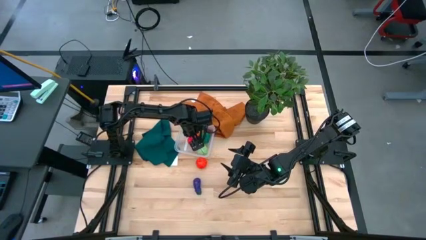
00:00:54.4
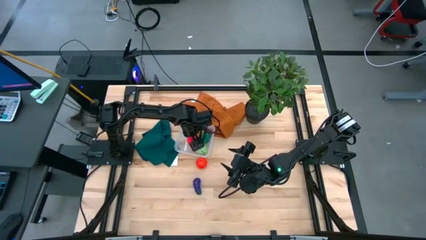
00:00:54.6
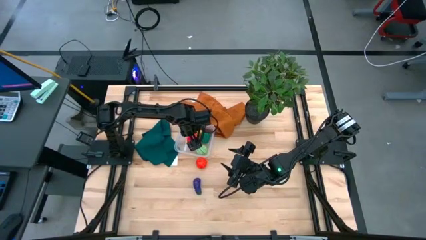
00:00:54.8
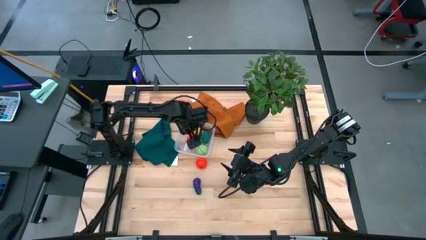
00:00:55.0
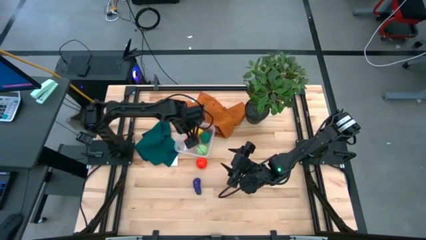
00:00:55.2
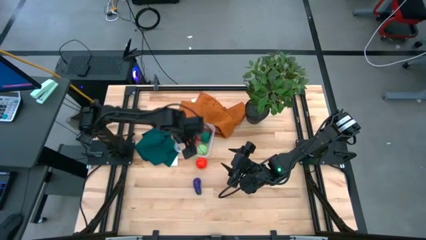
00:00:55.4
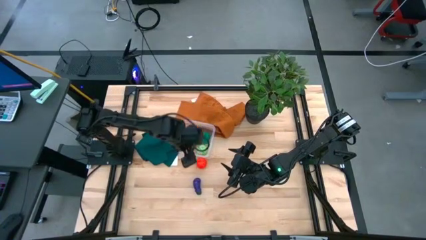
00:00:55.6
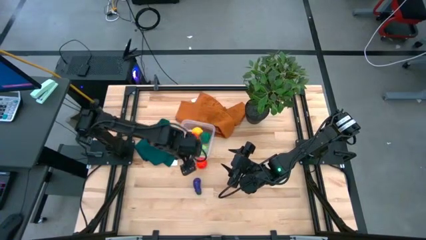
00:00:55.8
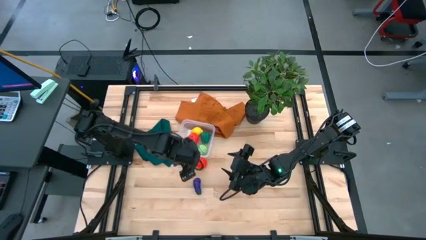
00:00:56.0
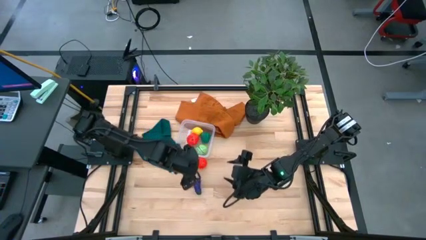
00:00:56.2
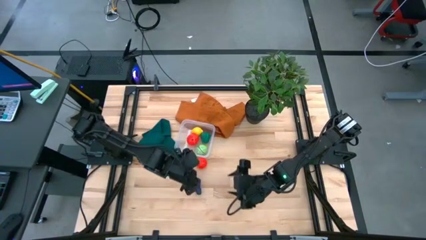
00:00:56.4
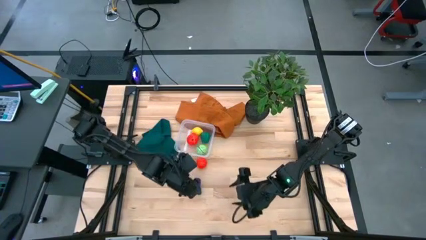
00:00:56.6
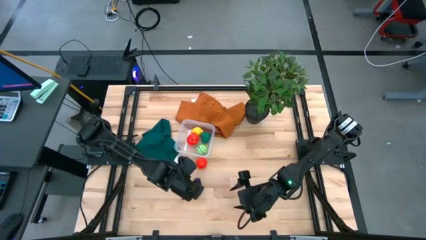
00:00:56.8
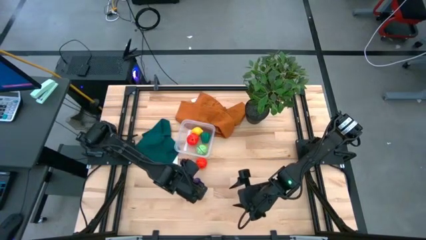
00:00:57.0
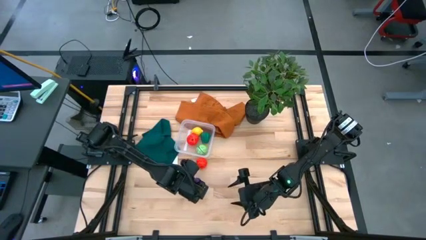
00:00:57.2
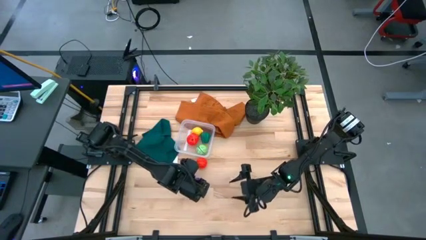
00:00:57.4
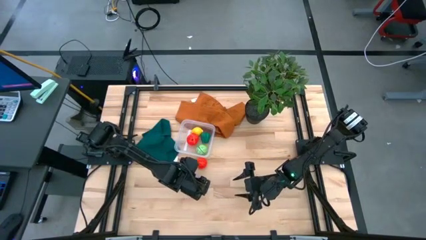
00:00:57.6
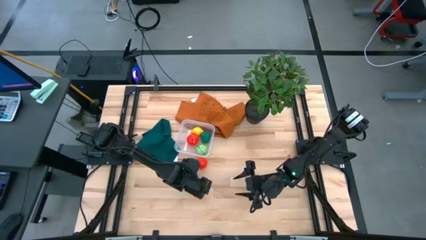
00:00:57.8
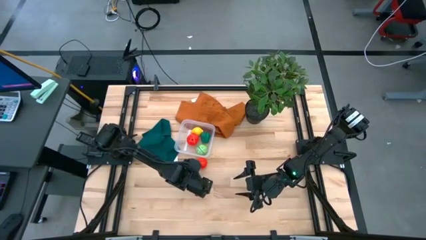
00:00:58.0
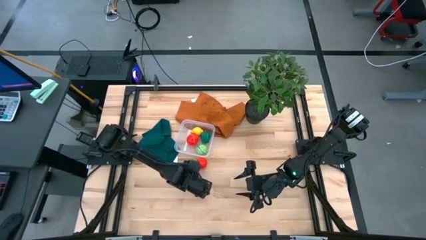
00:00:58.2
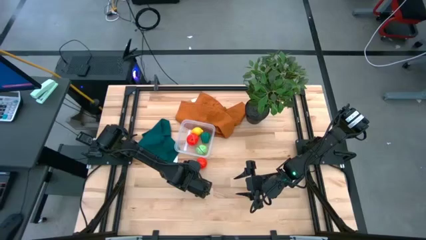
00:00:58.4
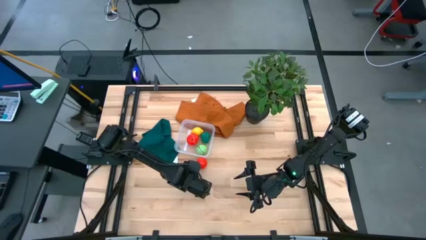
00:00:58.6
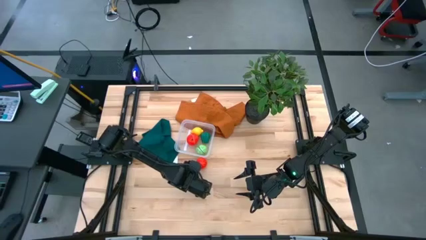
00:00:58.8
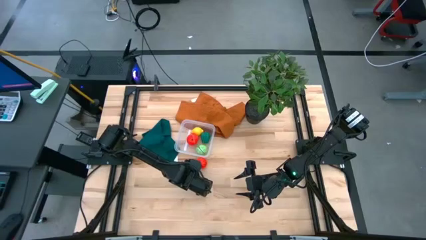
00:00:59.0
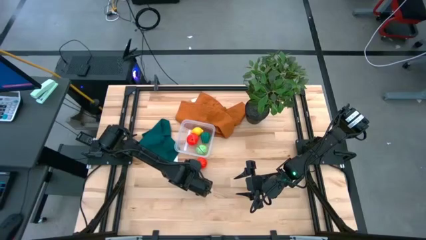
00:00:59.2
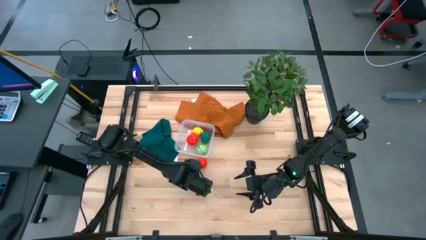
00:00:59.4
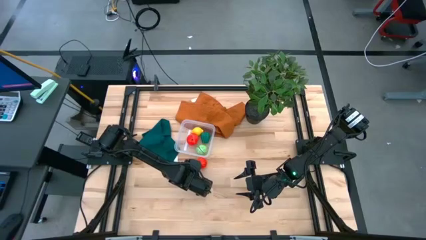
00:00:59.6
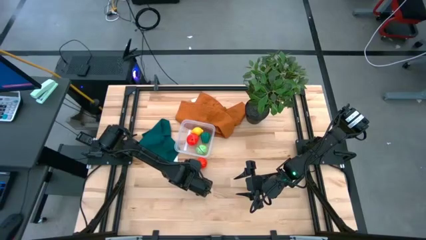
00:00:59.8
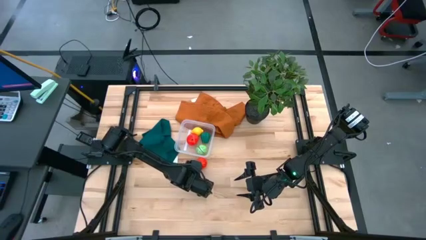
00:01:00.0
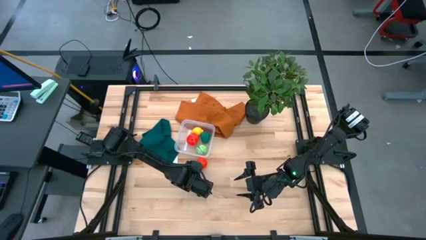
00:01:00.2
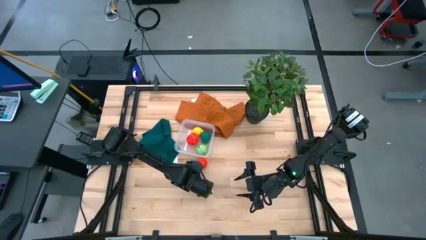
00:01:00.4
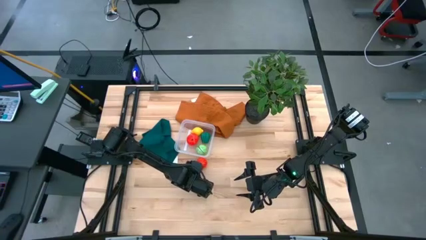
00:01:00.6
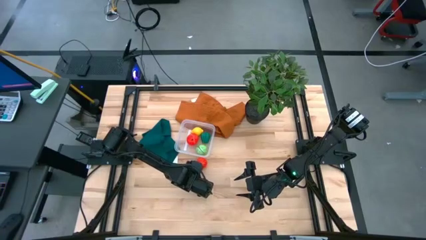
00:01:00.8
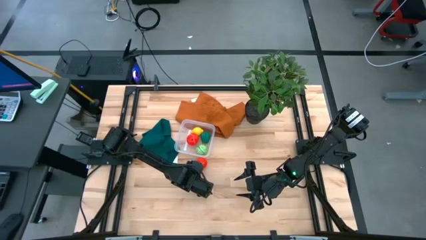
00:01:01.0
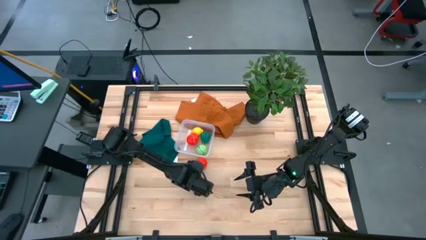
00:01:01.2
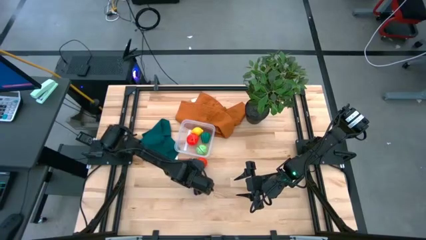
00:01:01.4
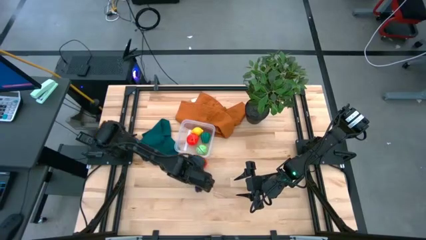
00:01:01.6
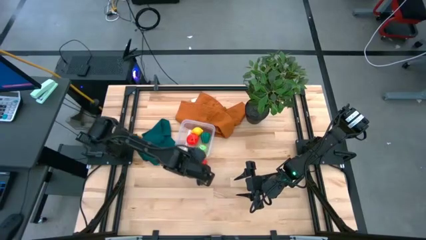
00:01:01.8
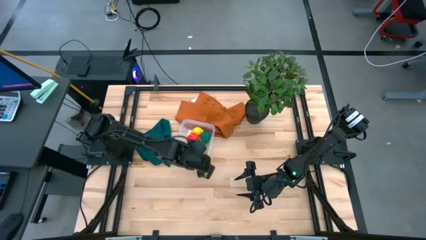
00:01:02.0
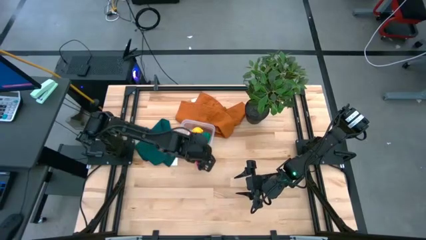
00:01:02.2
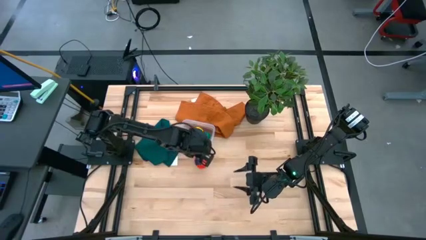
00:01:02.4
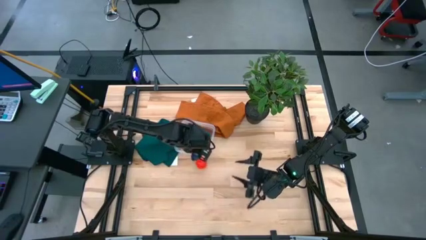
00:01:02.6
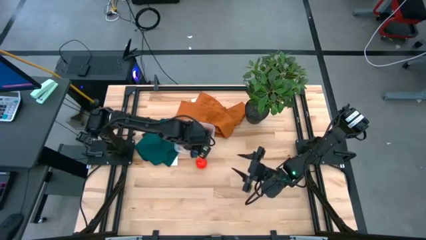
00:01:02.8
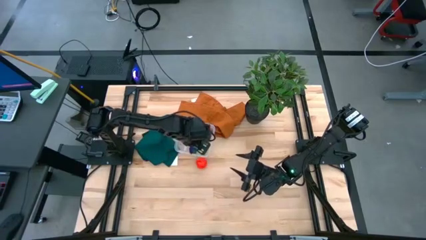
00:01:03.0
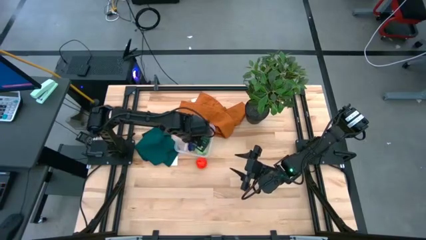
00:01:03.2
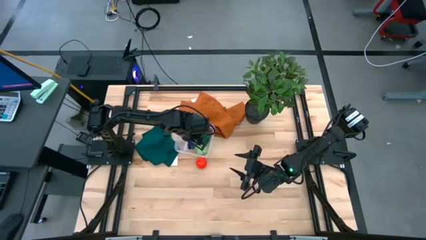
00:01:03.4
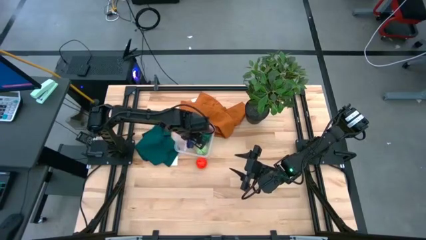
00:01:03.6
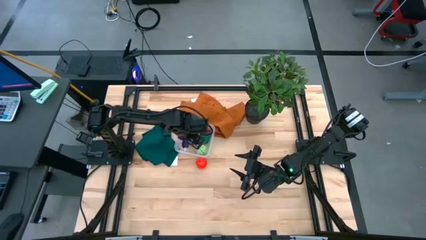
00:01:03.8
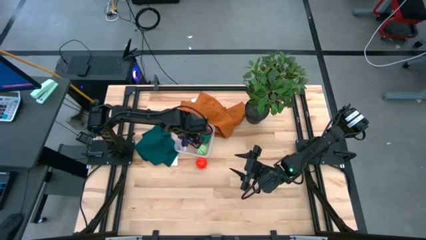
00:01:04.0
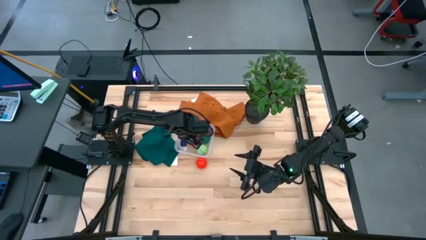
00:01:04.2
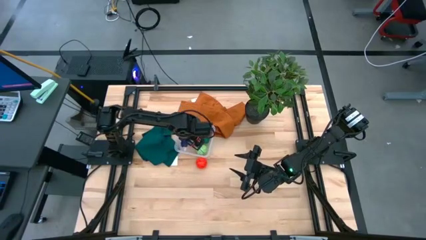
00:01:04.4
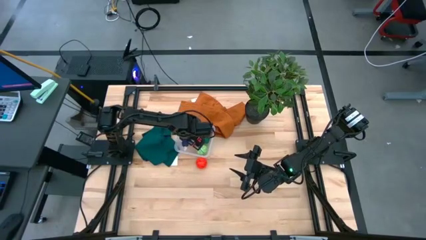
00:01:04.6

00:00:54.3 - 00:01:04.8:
Task: Pick and placing Produce into tupperware
Put the purple eggplant into the transparent bin

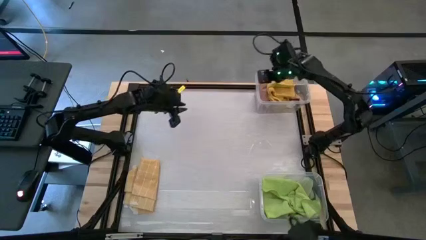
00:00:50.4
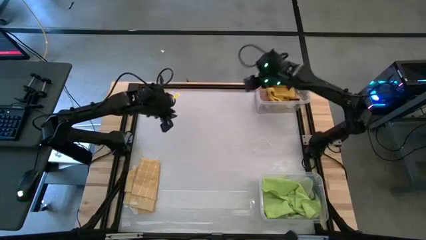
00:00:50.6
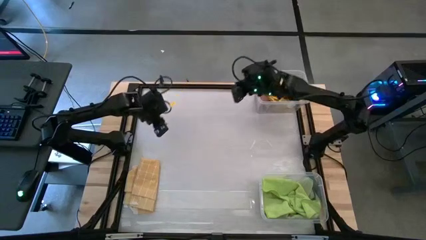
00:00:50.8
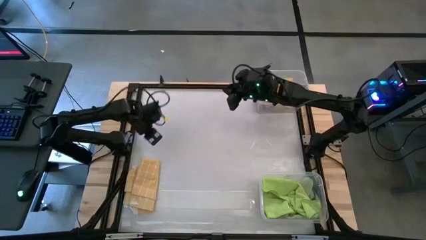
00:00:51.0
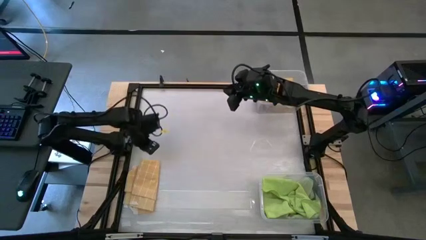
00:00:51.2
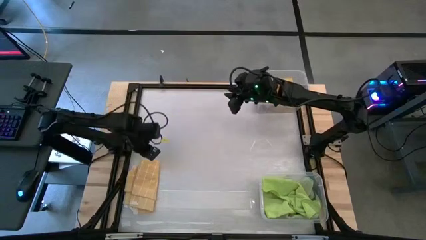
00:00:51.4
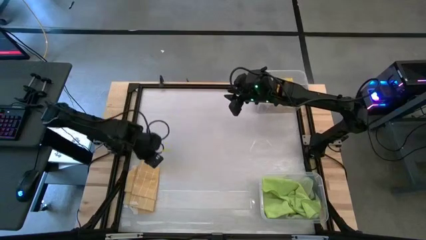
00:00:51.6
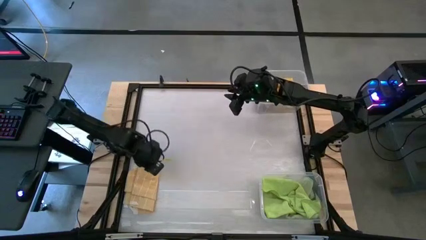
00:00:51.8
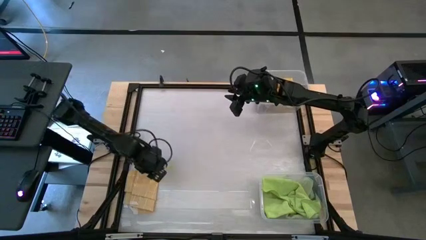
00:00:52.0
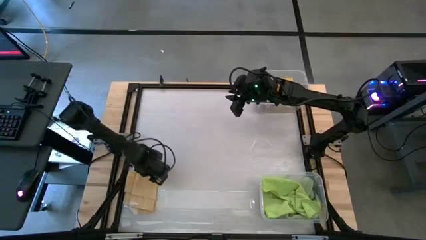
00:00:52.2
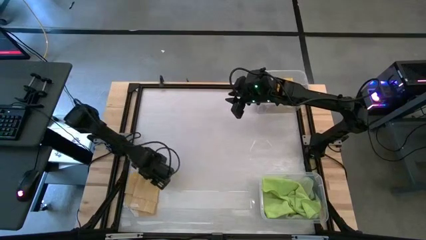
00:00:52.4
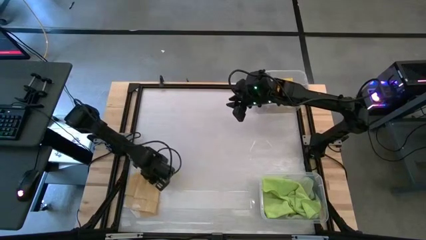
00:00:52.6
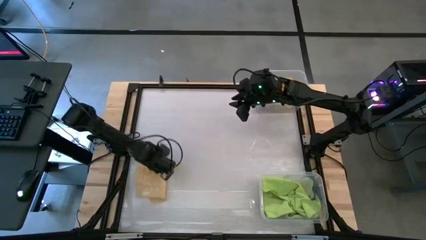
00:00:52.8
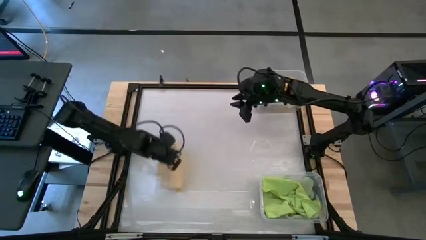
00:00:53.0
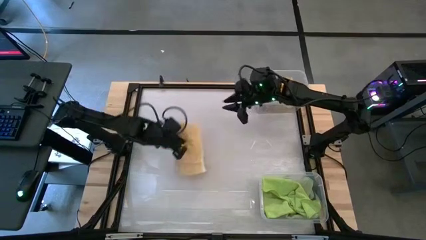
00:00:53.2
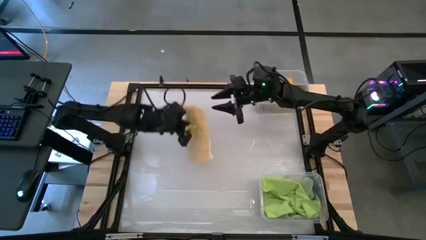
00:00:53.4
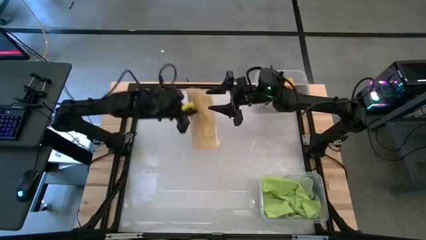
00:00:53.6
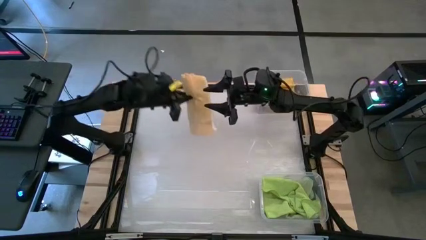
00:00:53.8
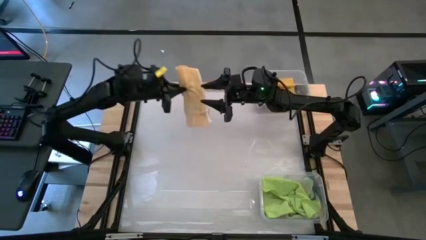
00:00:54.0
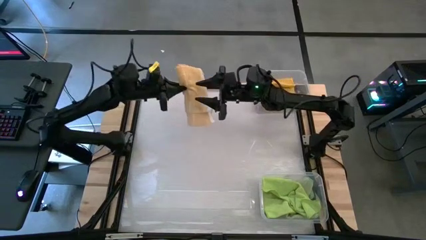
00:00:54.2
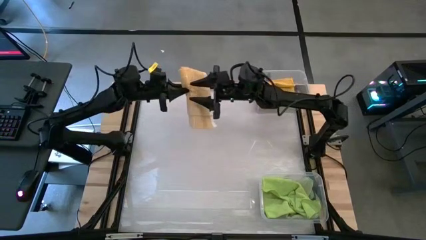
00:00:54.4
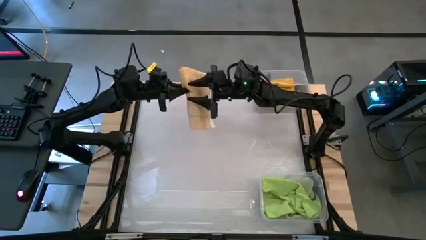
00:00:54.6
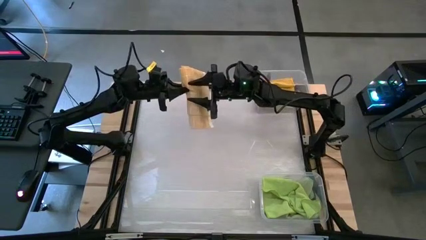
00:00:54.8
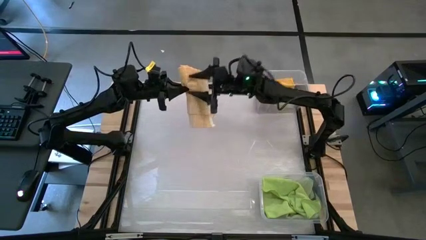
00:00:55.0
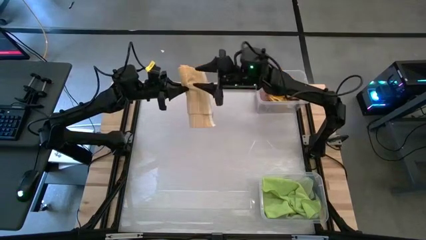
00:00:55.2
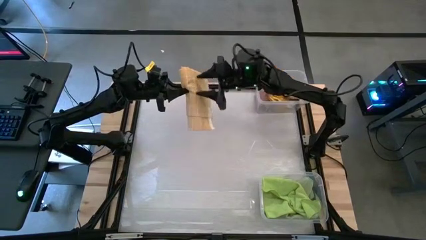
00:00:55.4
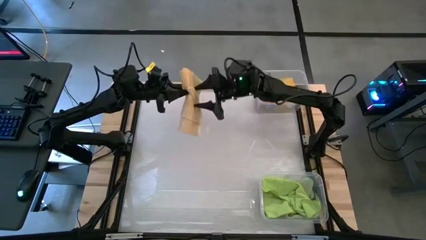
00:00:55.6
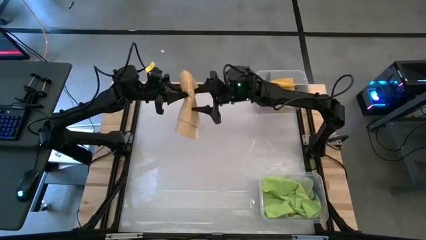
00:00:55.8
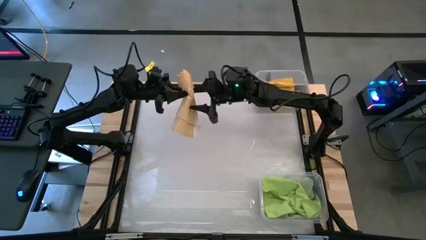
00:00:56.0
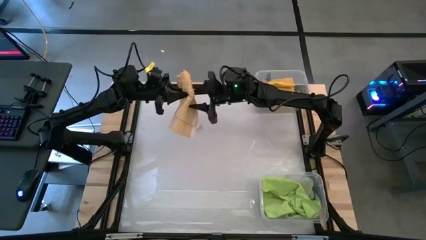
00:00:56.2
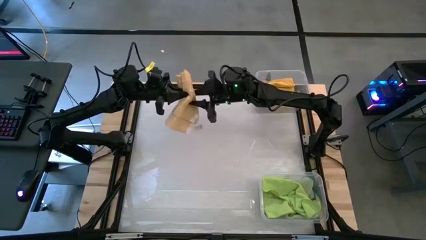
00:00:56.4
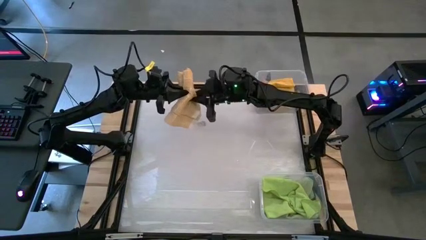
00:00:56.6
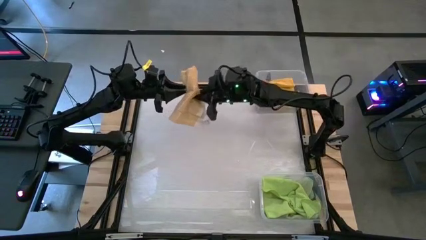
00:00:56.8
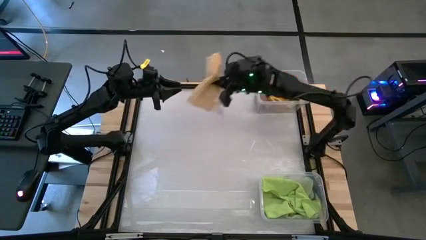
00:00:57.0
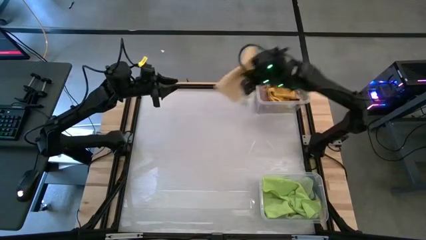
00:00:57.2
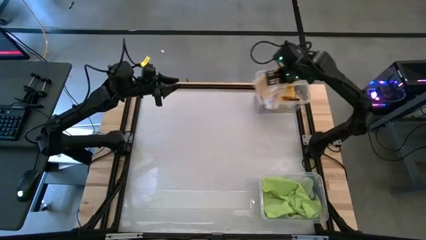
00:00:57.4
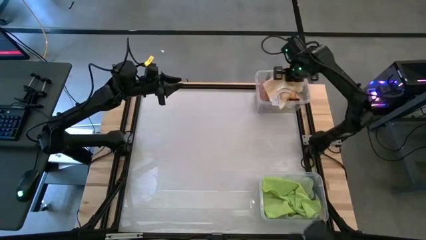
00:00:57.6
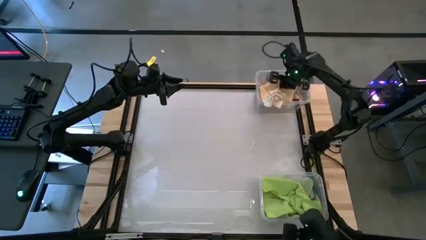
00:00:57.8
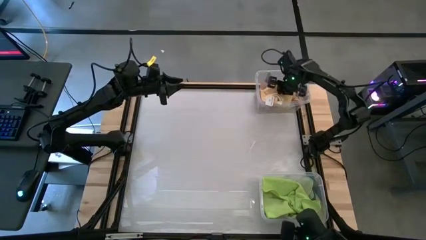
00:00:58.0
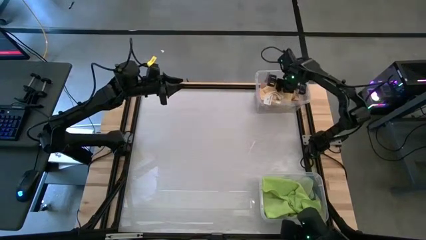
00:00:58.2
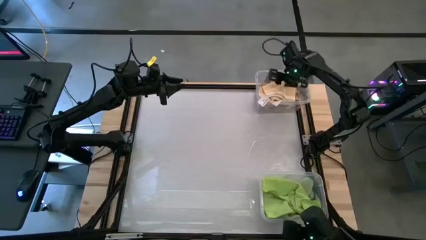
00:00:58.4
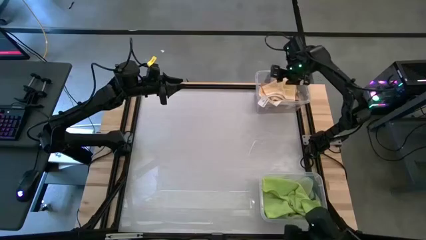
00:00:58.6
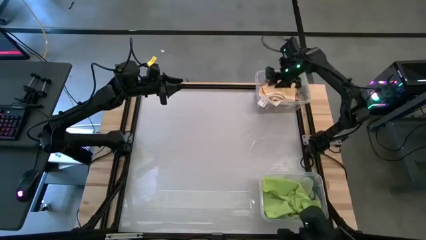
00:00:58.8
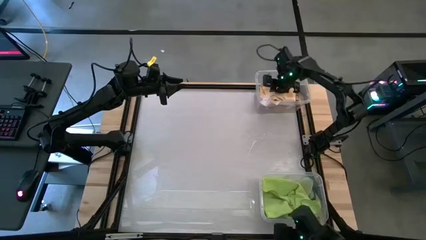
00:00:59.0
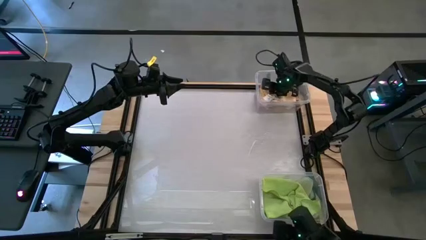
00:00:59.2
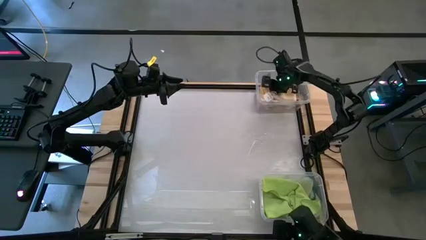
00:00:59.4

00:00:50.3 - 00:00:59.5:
Task: Sort microfiber towel by color & place in baskets
Put the light yellow towel into the top transparent bin
